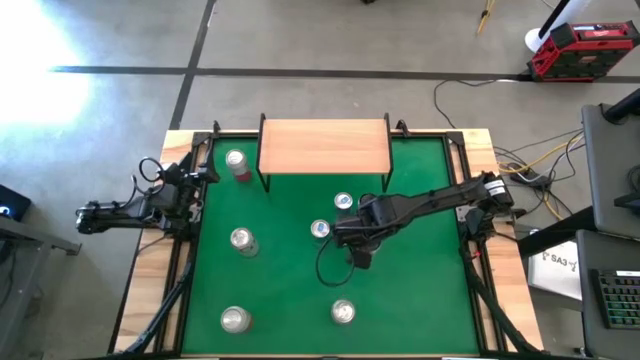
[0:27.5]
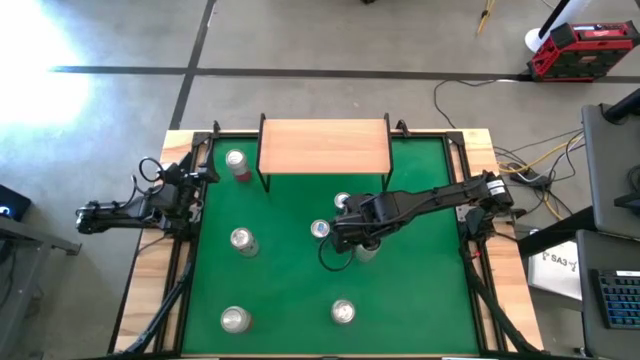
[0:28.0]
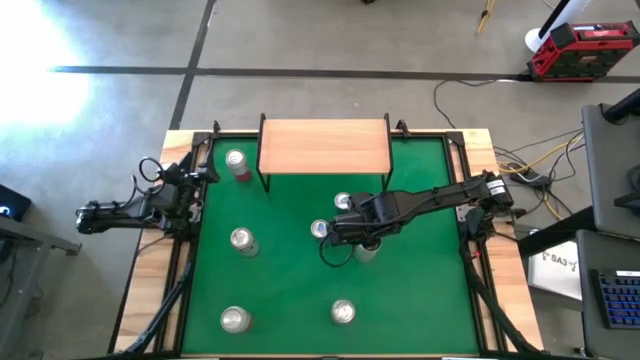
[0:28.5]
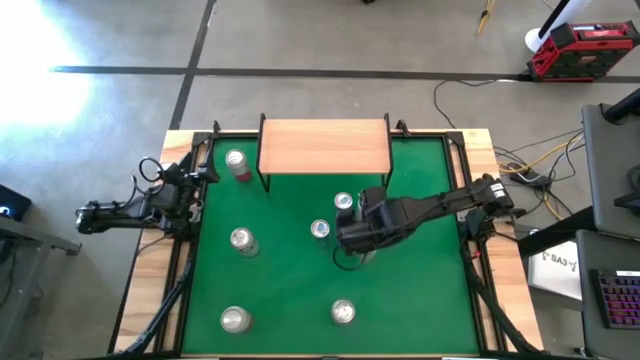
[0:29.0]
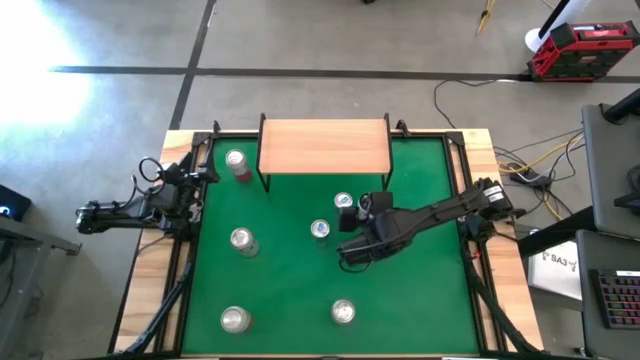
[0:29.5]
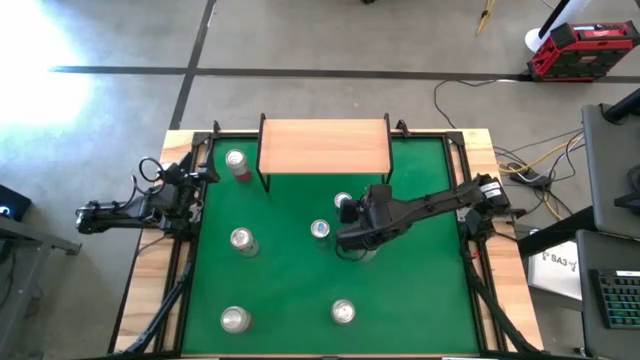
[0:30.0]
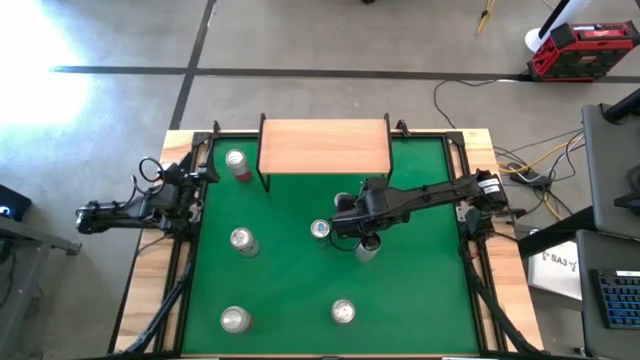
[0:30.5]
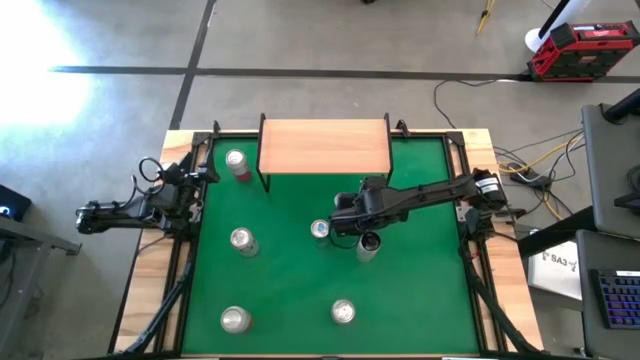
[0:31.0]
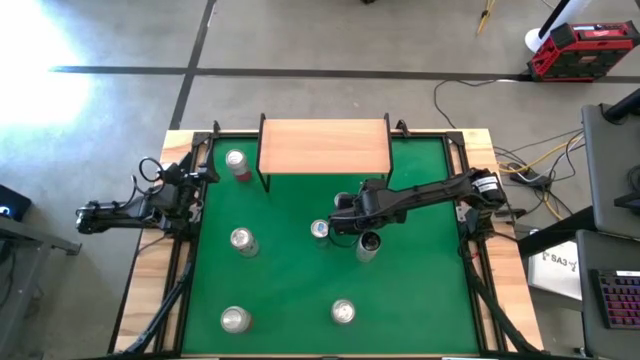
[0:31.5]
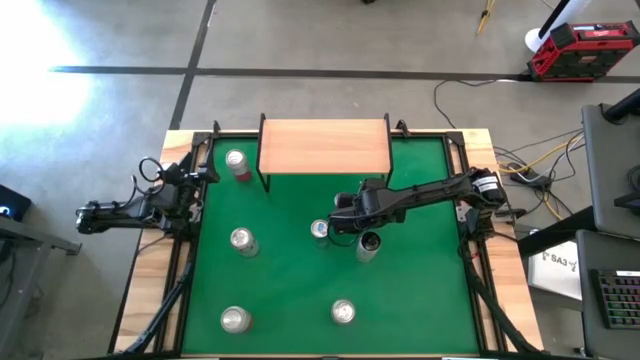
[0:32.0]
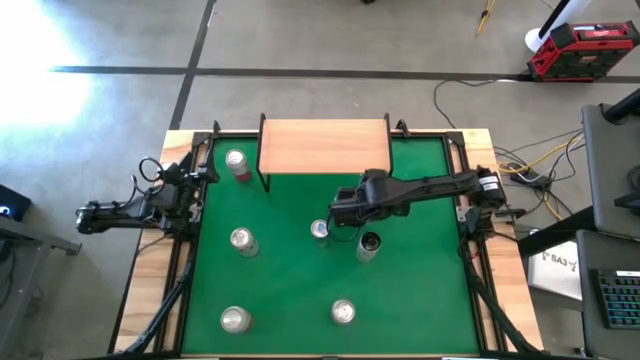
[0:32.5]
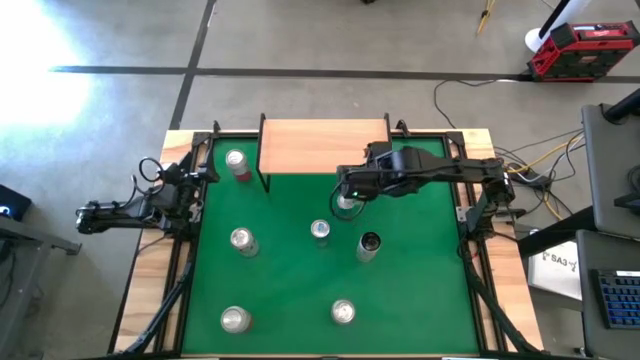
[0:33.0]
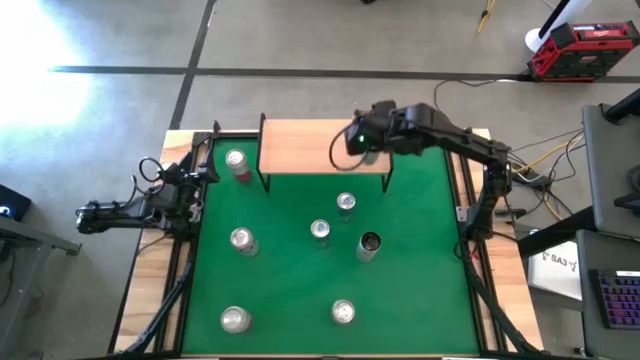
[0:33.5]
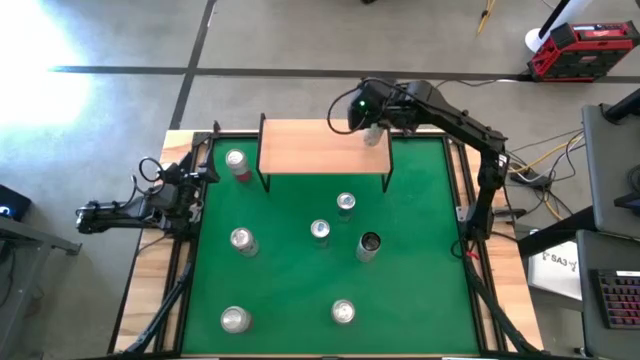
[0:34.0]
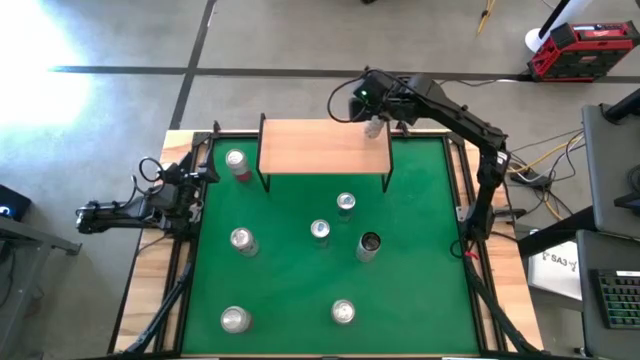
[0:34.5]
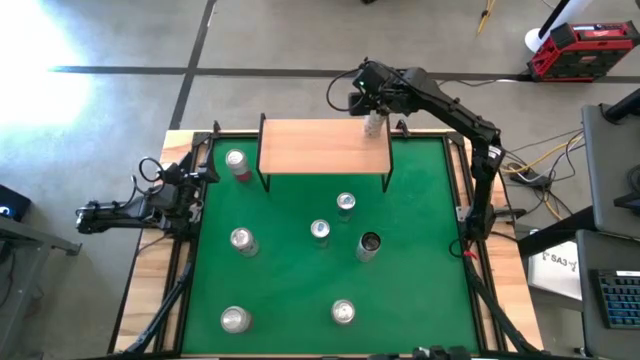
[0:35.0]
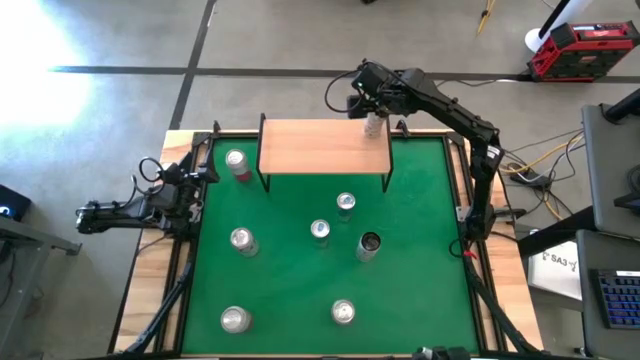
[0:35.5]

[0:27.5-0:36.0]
Task: Place canned beverage on shelf
Put the top white-yellow soda can on the shelf

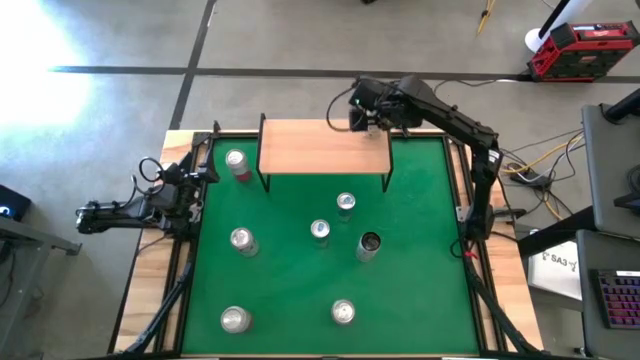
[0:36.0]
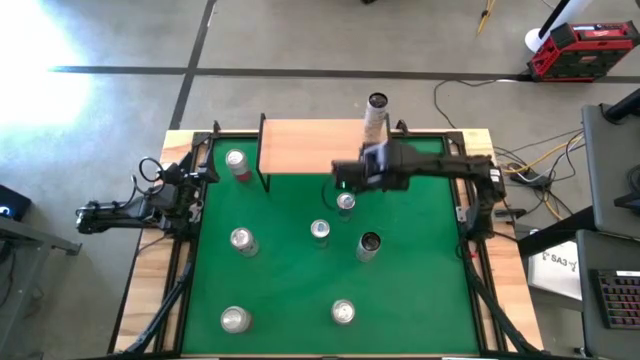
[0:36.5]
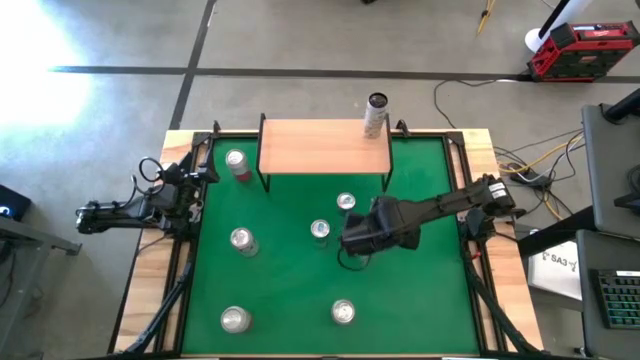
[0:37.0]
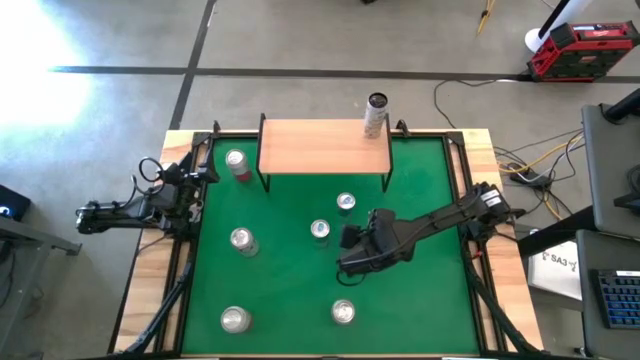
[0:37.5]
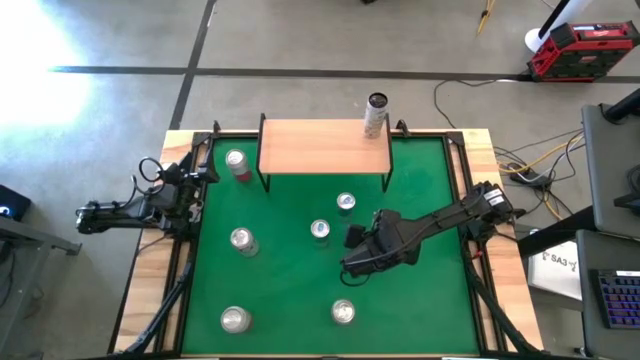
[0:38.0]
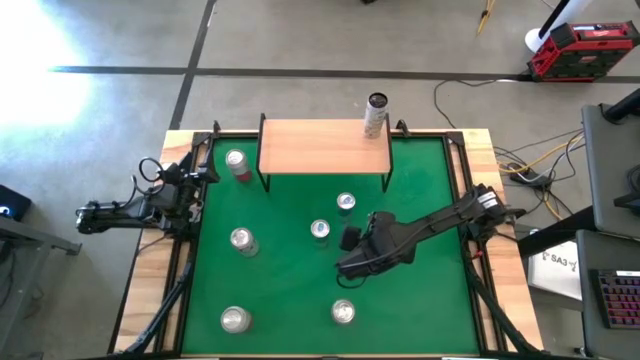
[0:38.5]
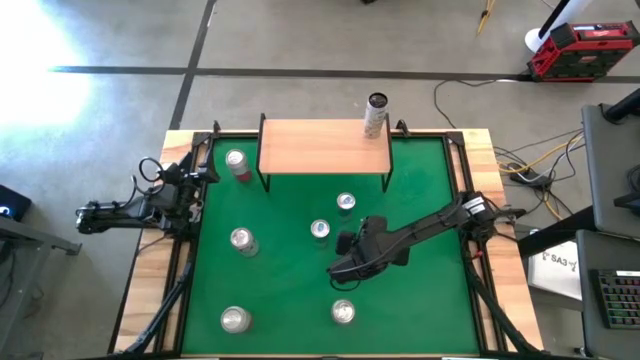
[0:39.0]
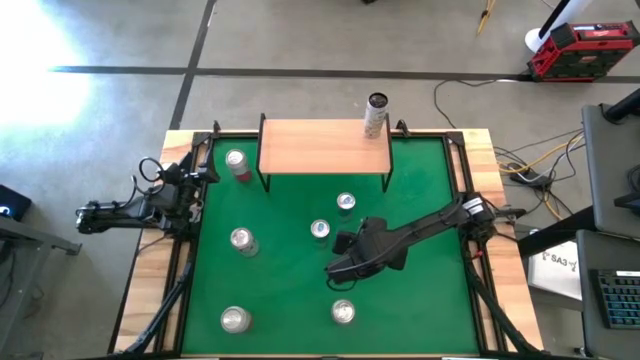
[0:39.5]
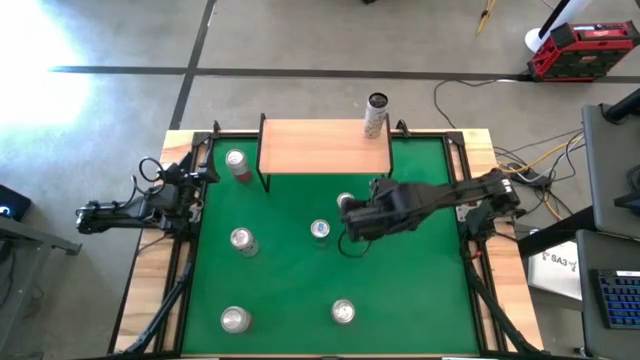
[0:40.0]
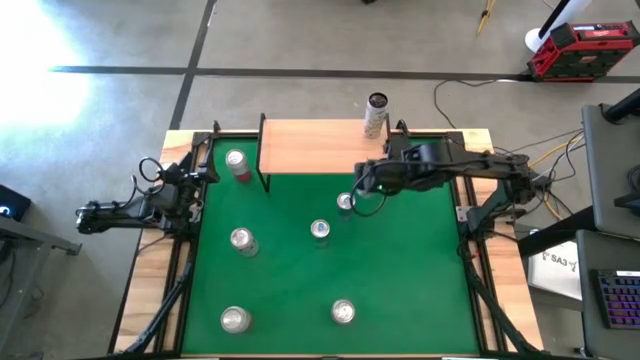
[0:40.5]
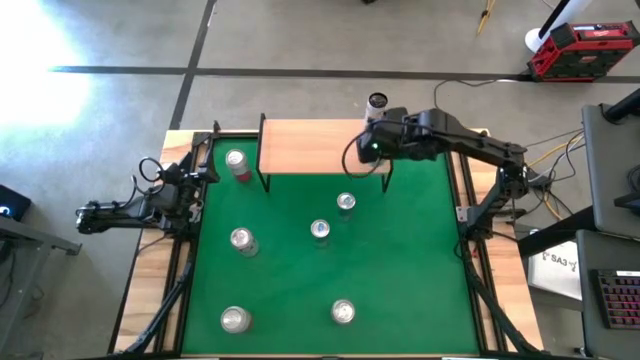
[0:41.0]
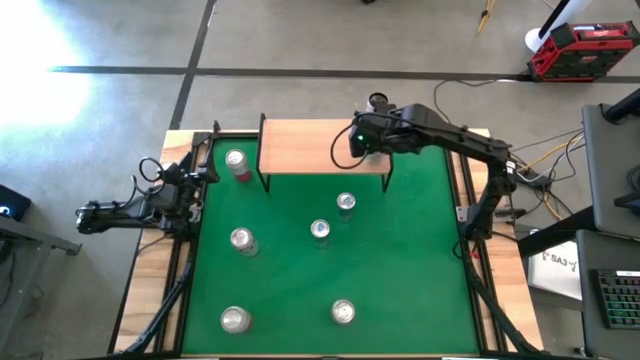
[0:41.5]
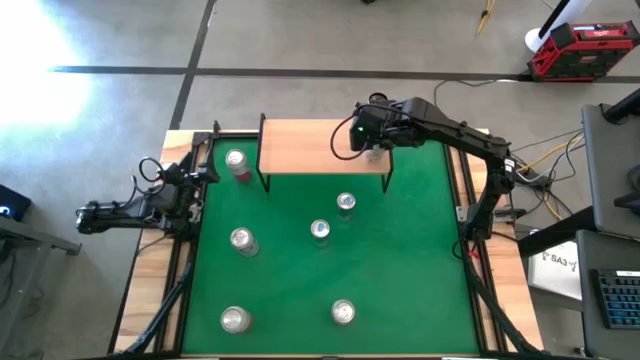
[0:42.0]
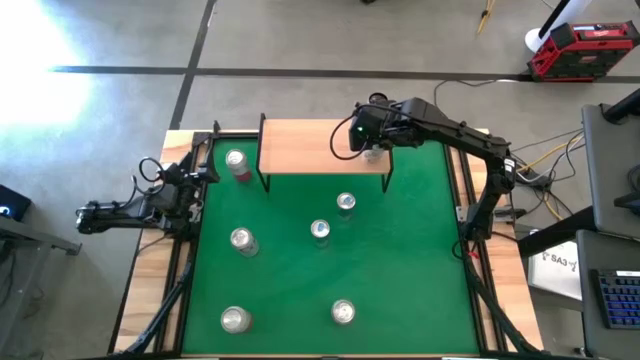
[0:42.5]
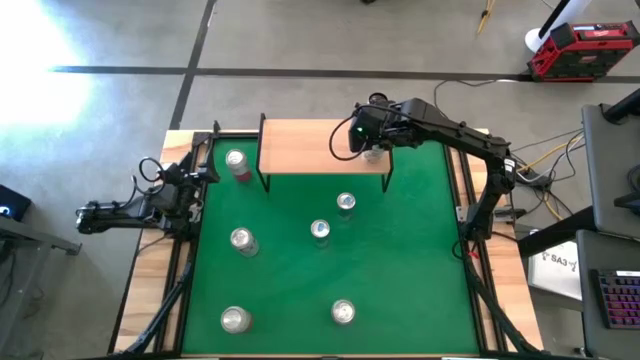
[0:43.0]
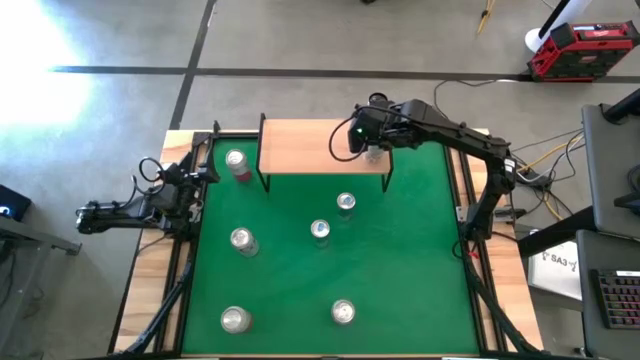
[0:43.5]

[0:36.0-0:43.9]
Put the white-yellow soda can on the shelf aligned with the other white-yellow soda can

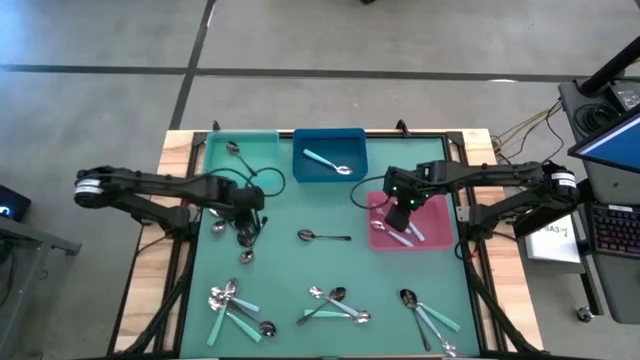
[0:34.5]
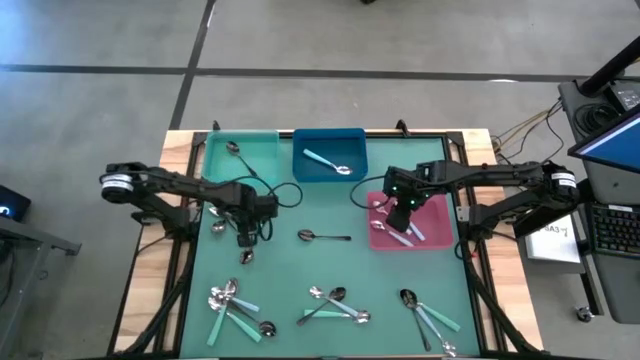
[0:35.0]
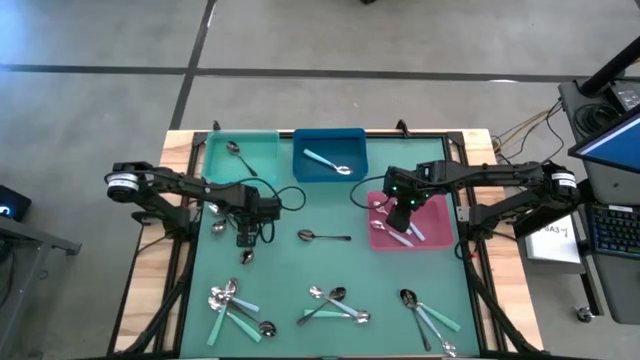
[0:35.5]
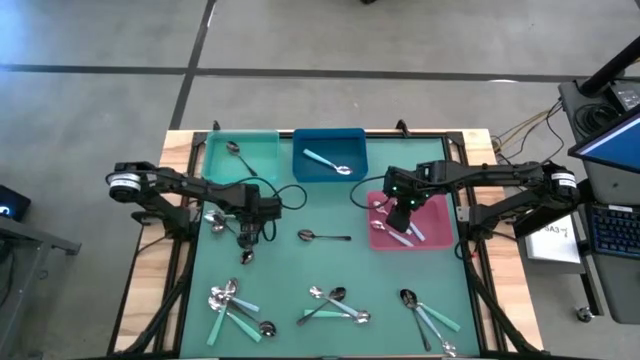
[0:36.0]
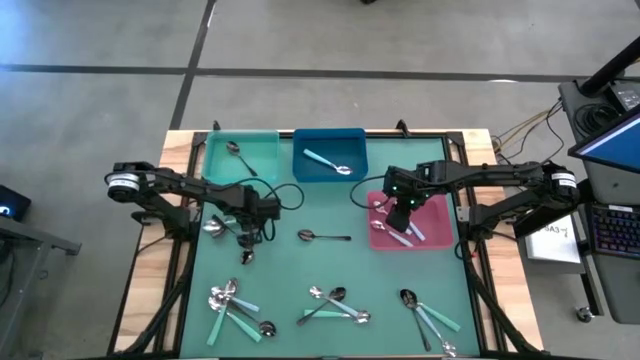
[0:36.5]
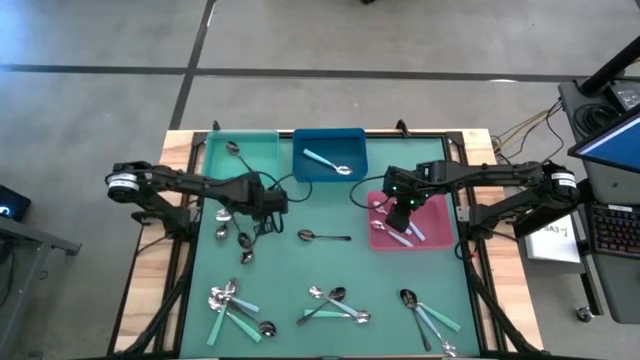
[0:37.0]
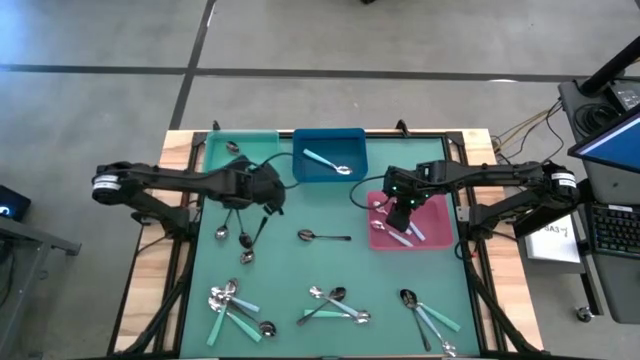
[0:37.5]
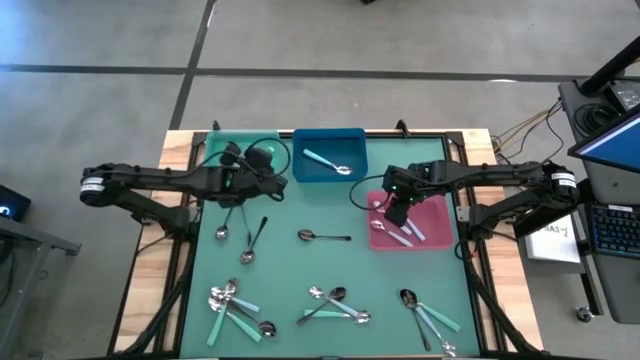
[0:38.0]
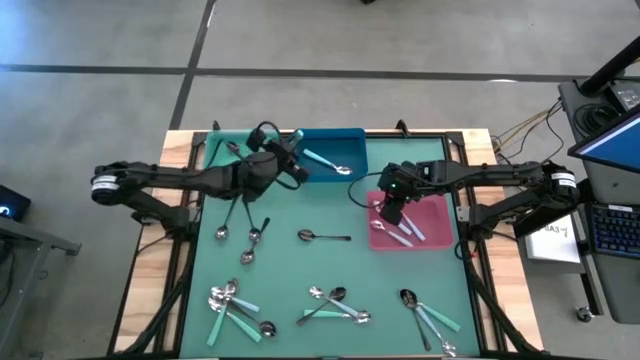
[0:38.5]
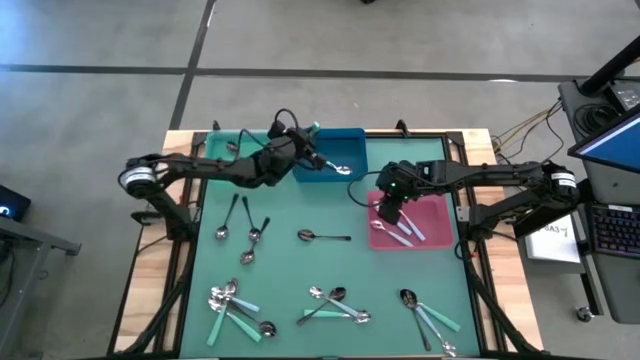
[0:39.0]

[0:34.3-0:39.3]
Task: Sort silverware by color (type)
Put the green spoon into the blue bin
